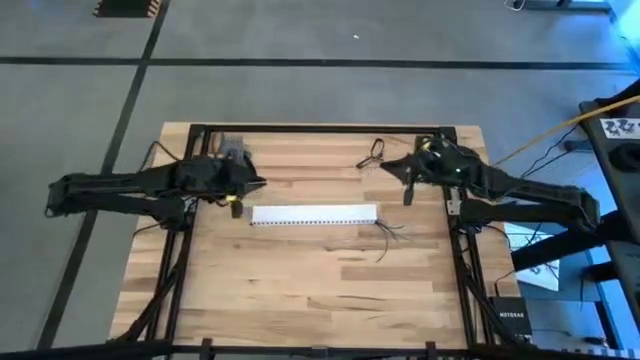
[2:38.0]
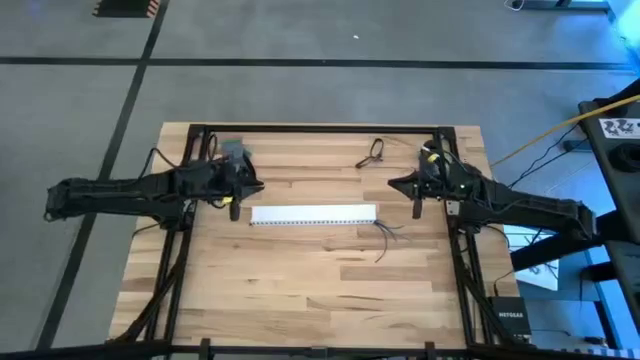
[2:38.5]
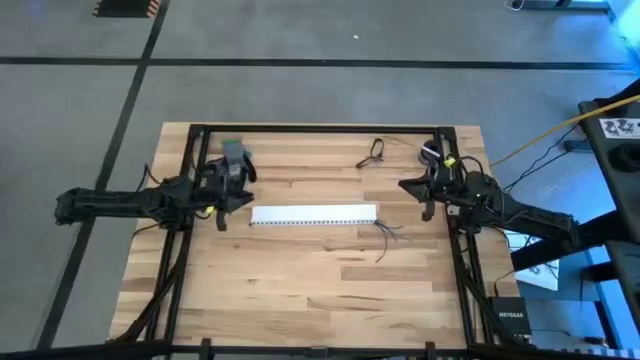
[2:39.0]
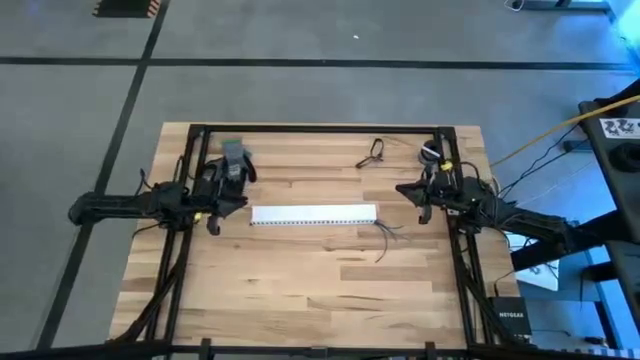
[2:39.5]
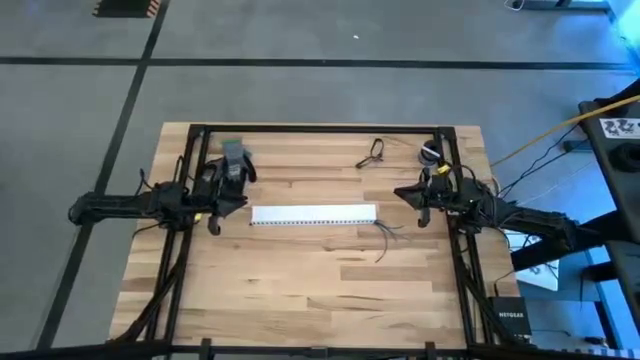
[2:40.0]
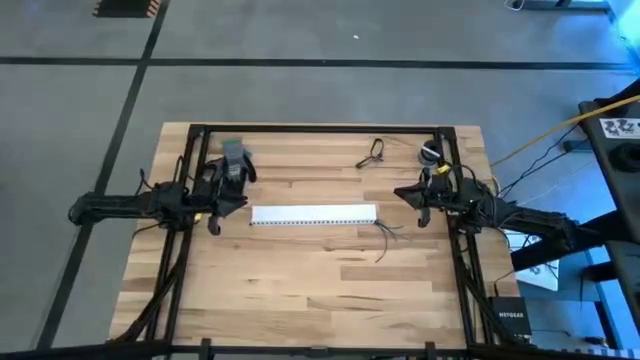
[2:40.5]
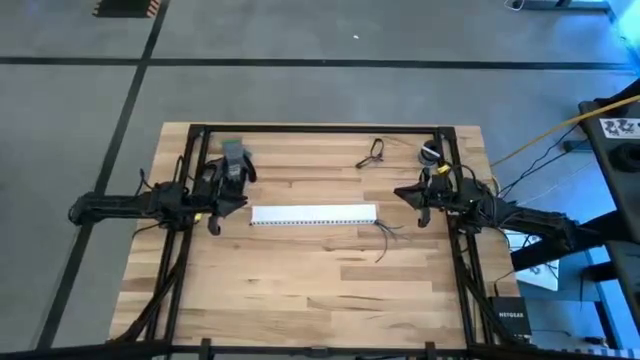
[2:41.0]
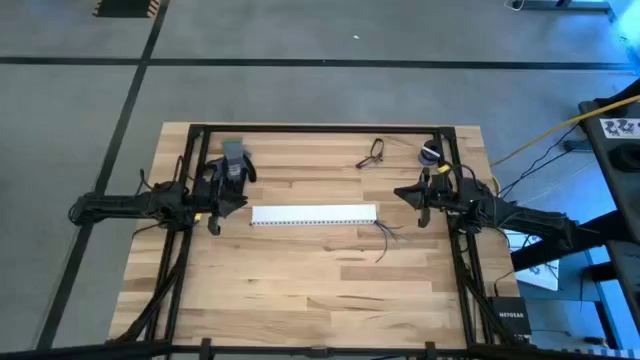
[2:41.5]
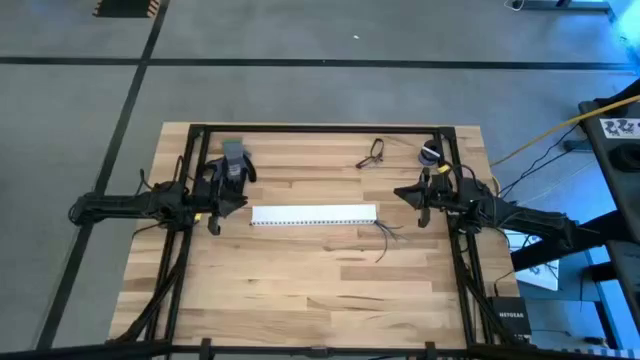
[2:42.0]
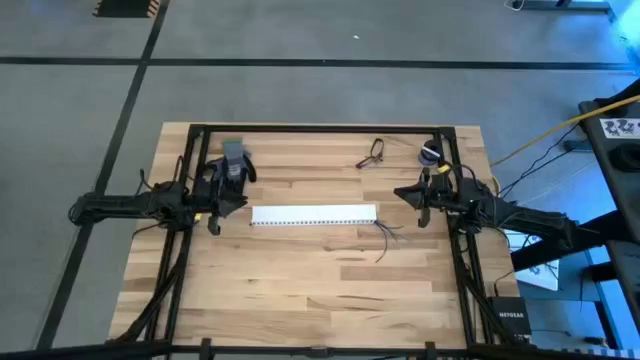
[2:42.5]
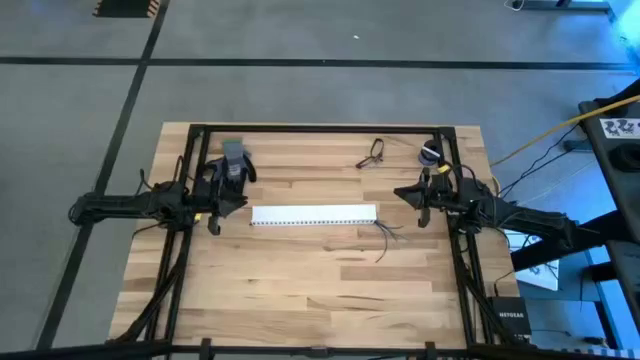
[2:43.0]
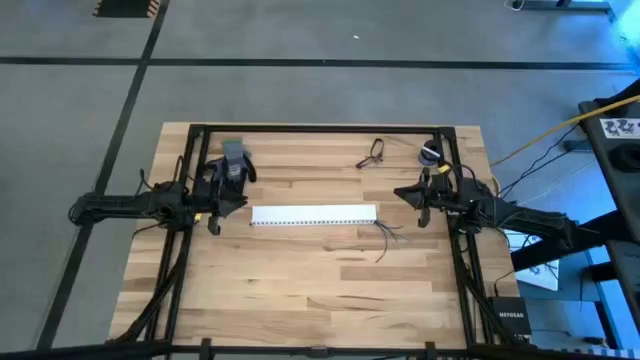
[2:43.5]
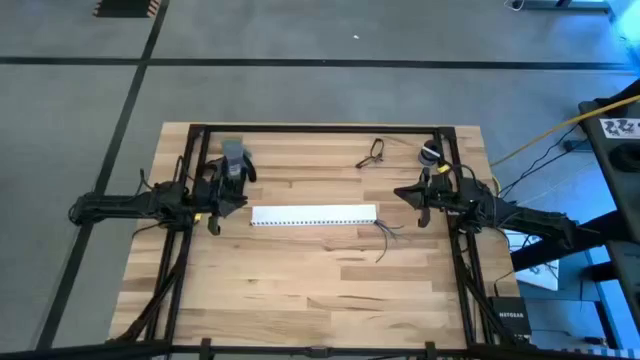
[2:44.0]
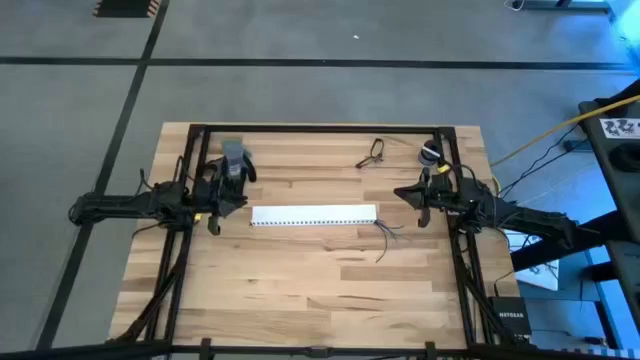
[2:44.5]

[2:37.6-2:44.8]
Task: Ziptie cables
Return to Home Position

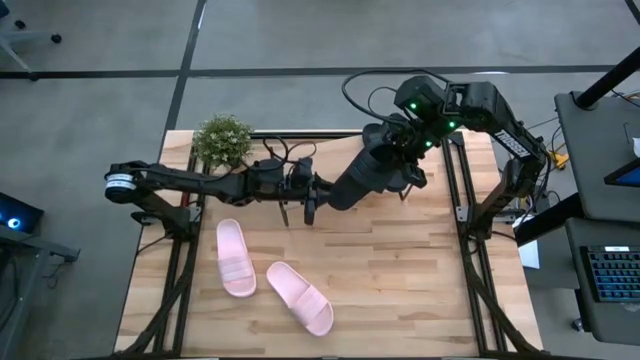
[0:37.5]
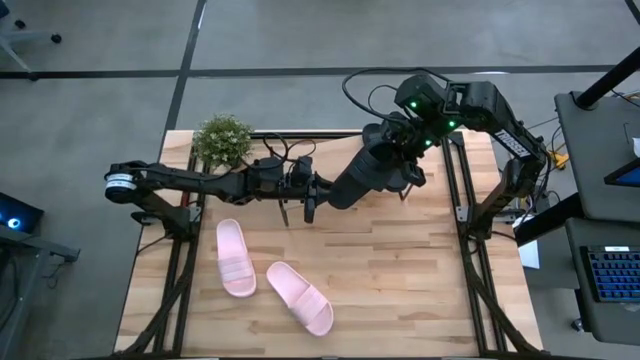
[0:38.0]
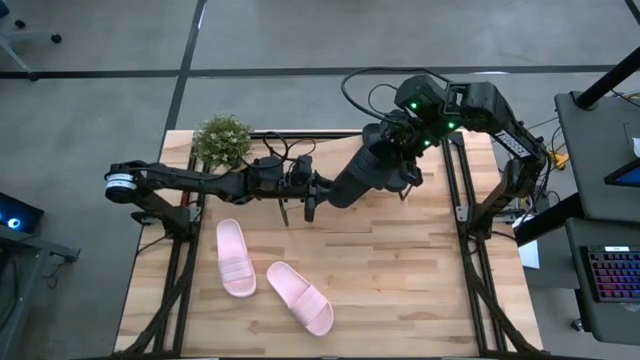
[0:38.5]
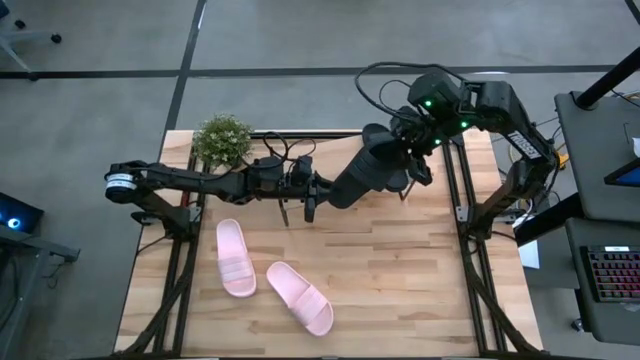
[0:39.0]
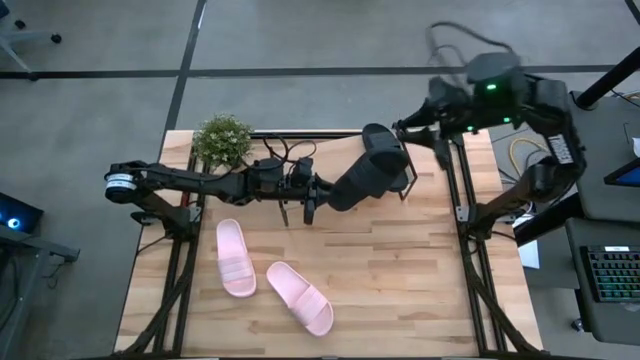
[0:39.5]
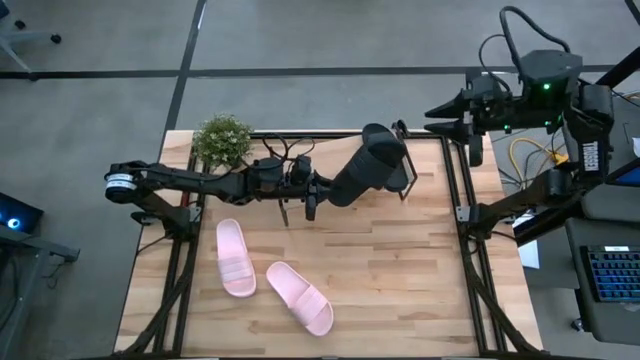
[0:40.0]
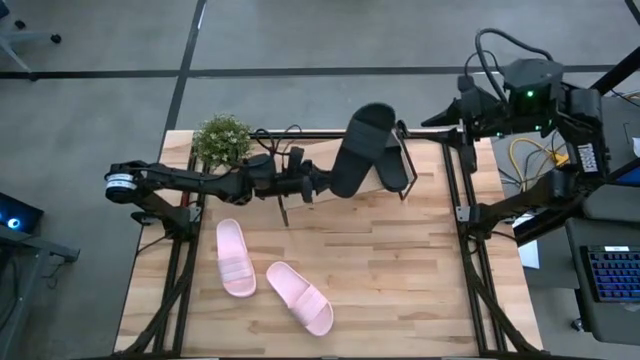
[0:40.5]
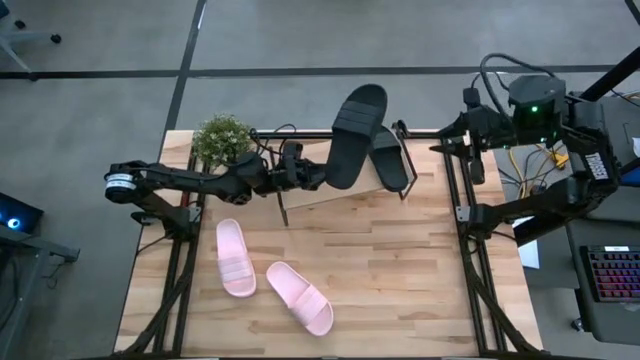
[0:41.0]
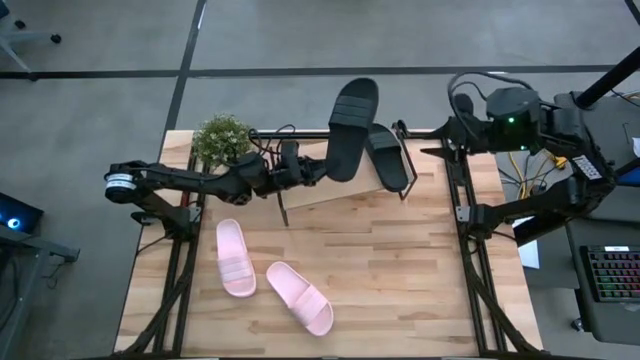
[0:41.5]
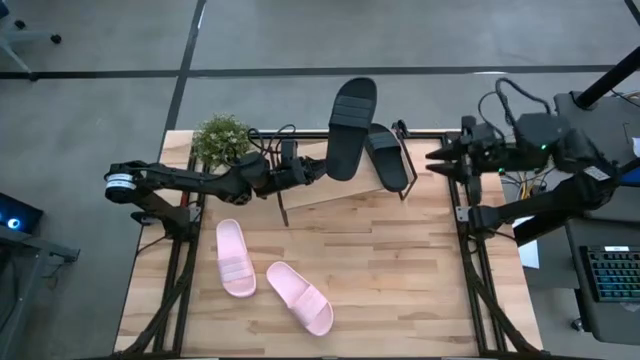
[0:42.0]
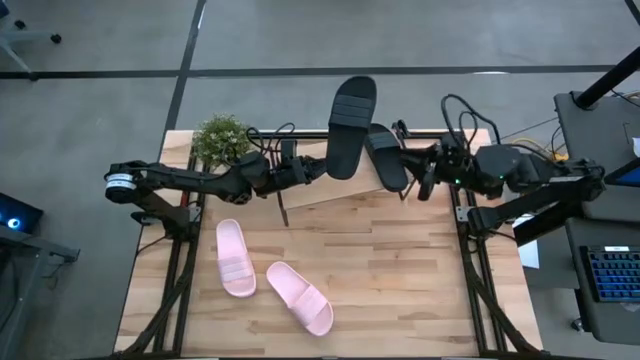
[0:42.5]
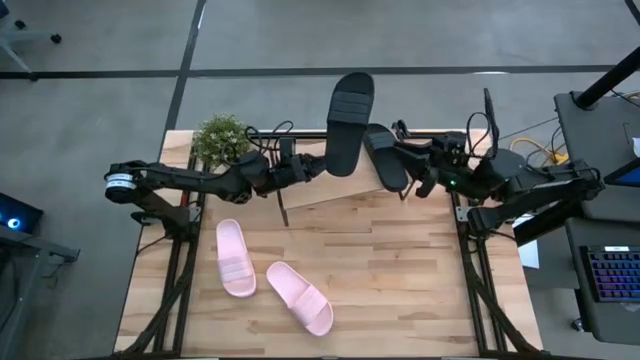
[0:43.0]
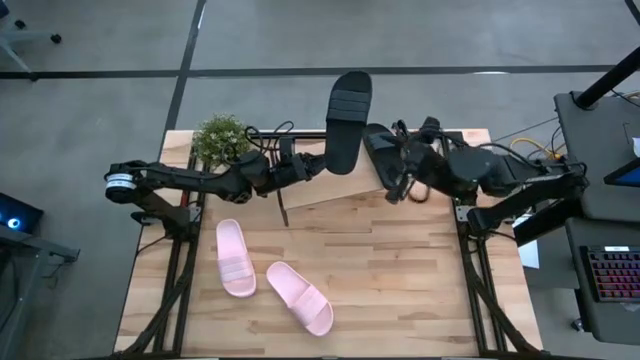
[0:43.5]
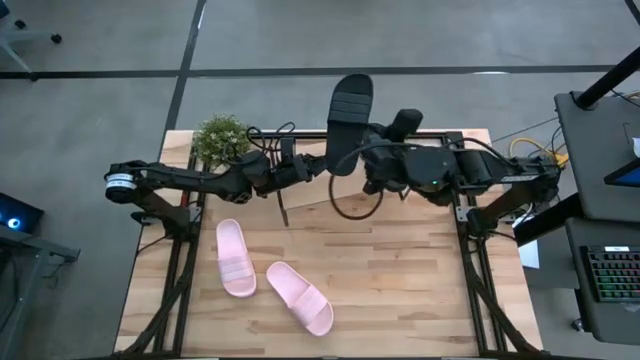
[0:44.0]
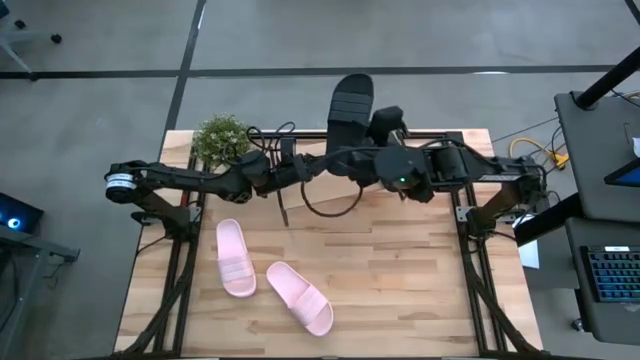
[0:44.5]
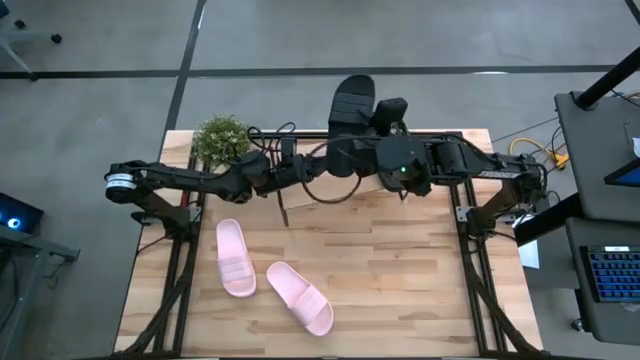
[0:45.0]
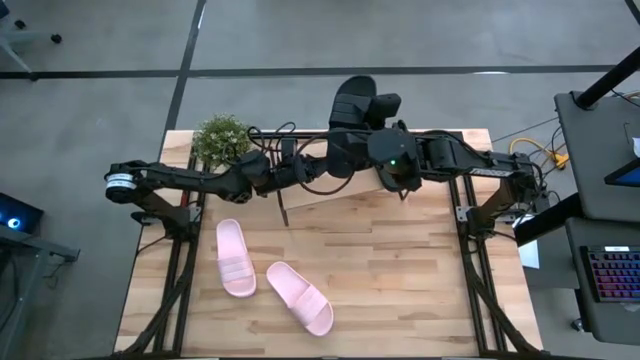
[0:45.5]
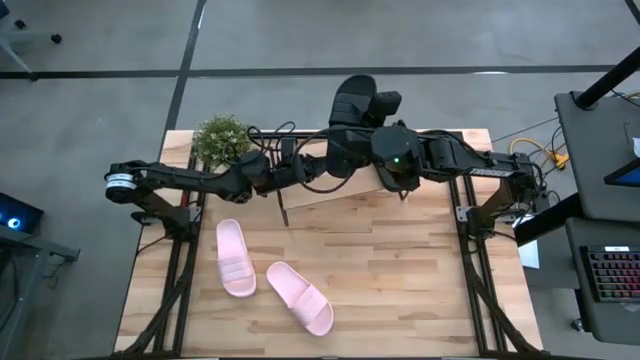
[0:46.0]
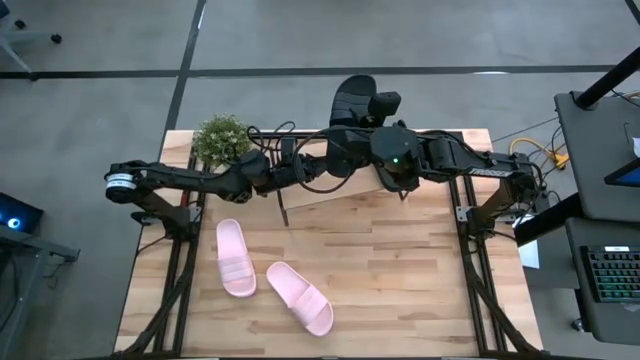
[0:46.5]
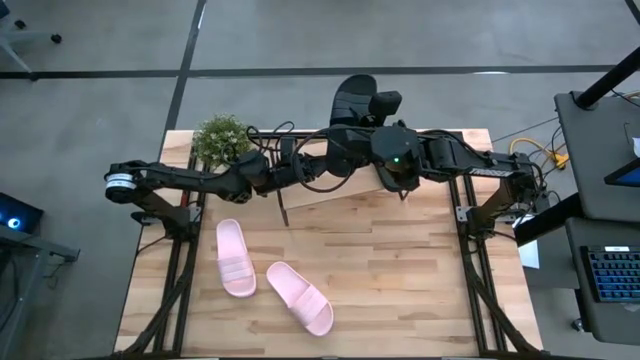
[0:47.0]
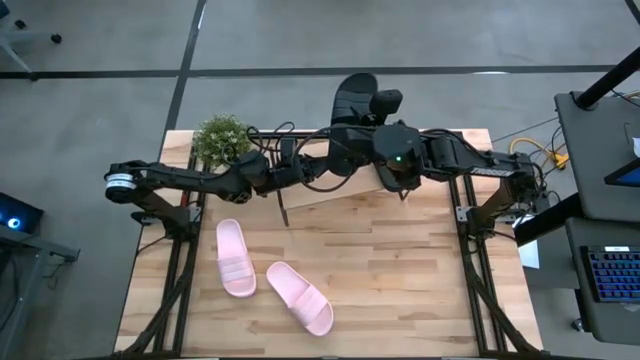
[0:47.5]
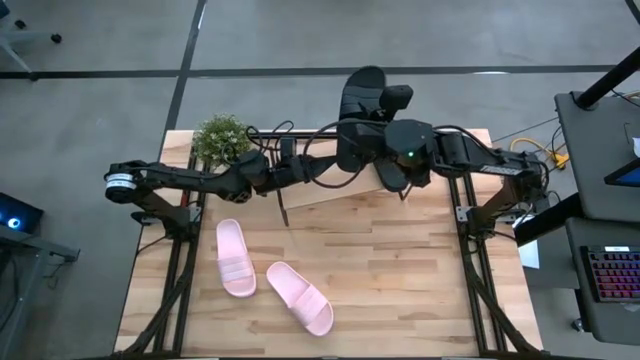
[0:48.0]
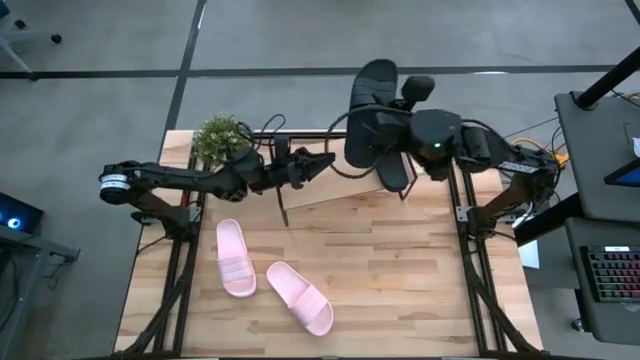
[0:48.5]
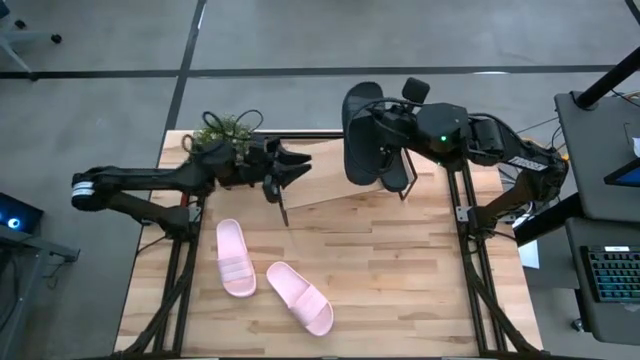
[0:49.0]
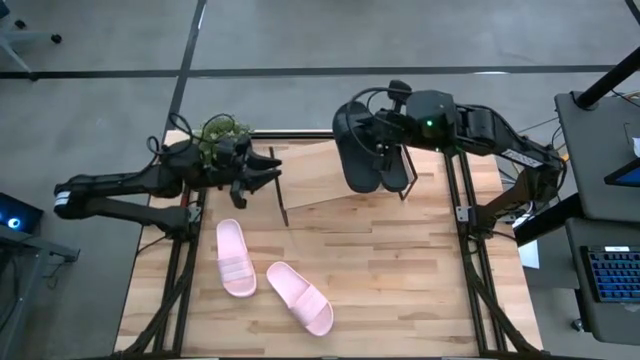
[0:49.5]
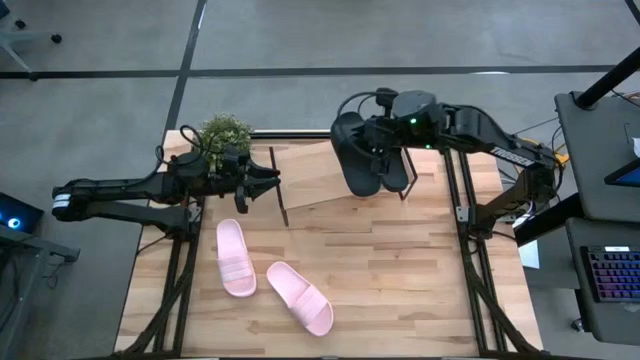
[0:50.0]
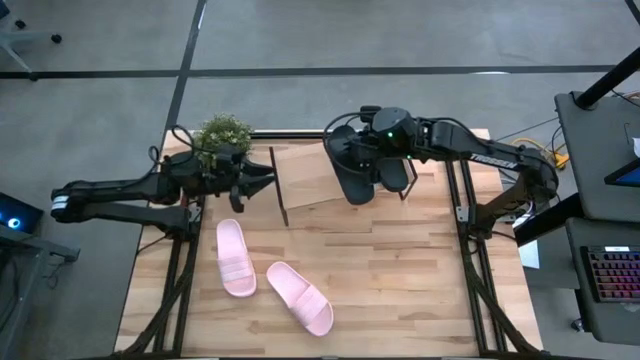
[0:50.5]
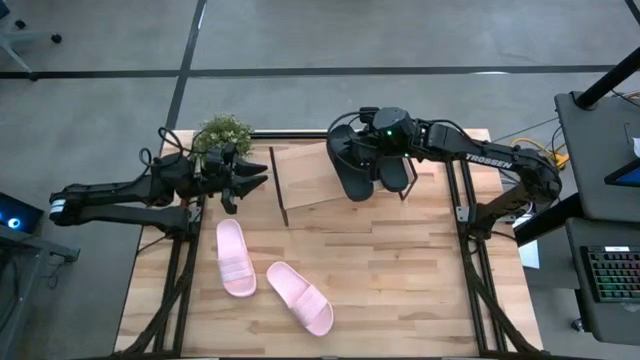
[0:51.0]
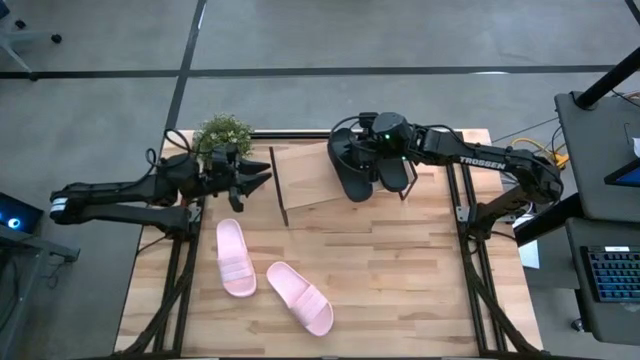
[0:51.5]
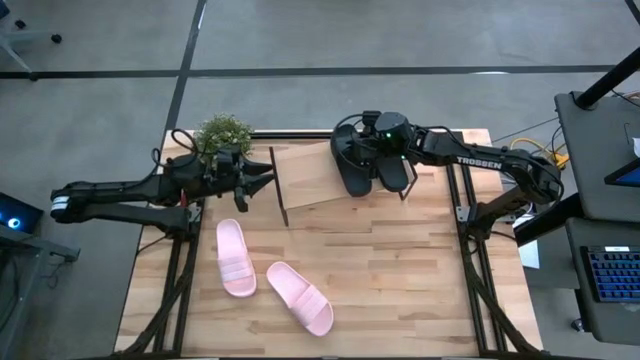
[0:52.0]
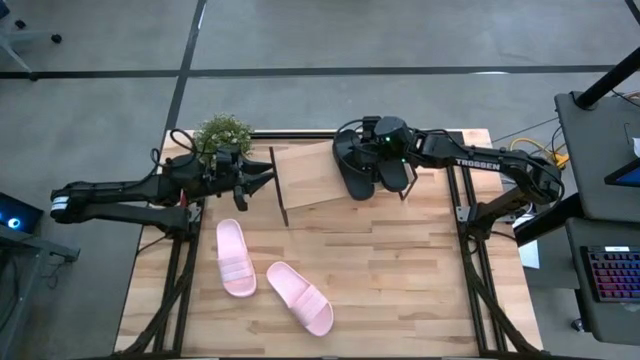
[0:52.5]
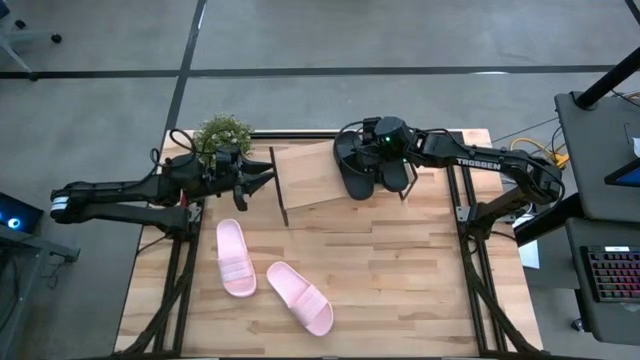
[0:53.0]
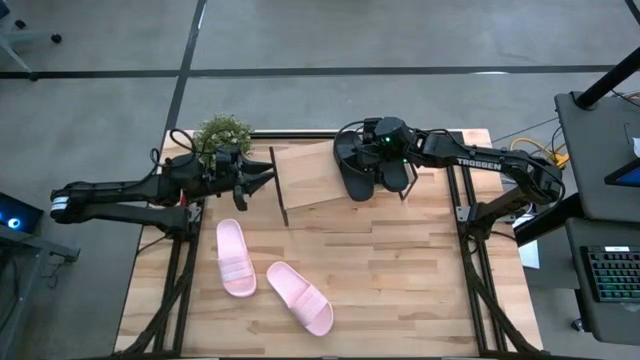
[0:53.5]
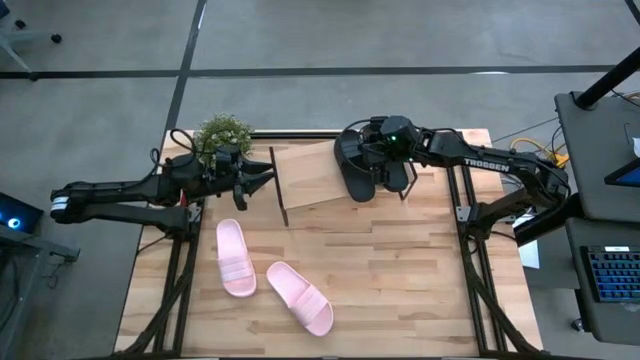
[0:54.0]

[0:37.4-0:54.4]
Task: Pick and place slides into the shelf
Put the black slipper on the shelf
